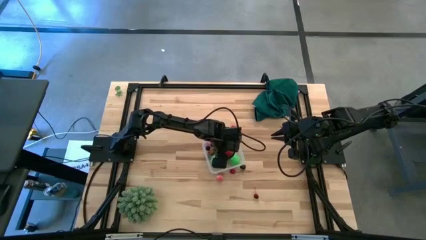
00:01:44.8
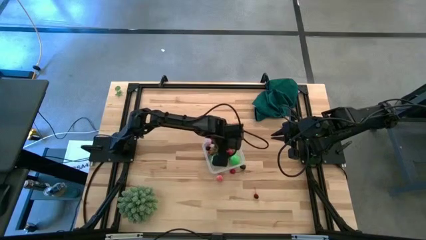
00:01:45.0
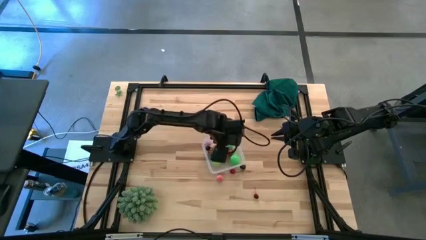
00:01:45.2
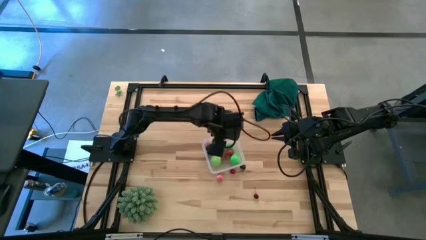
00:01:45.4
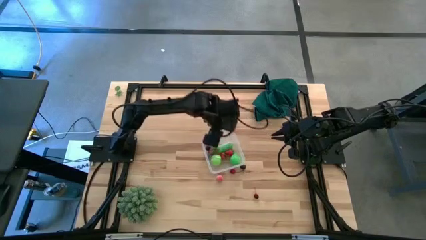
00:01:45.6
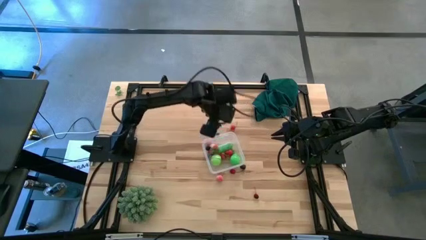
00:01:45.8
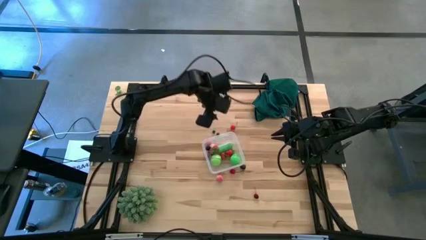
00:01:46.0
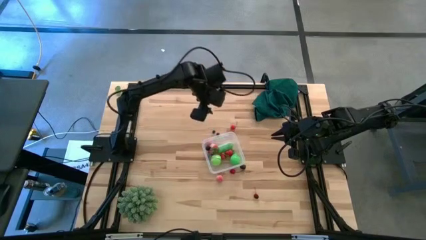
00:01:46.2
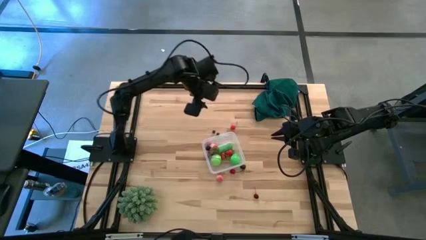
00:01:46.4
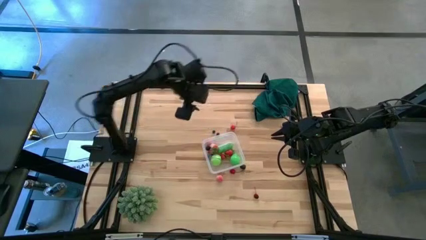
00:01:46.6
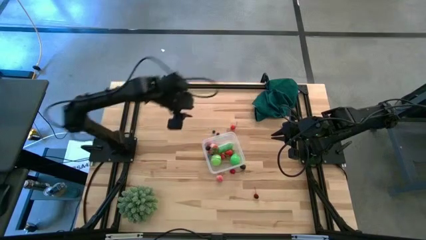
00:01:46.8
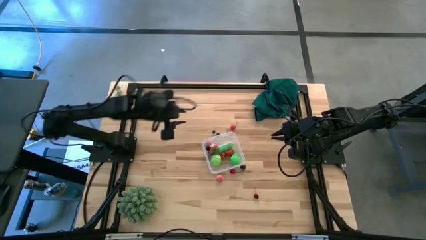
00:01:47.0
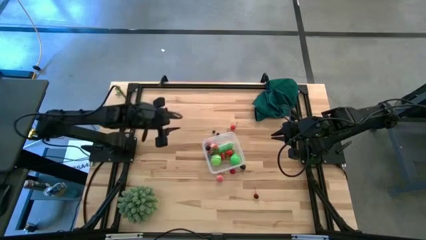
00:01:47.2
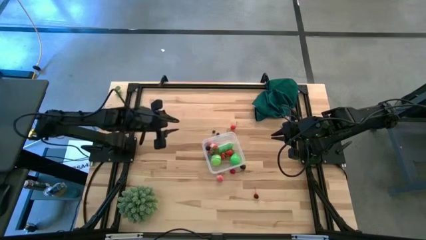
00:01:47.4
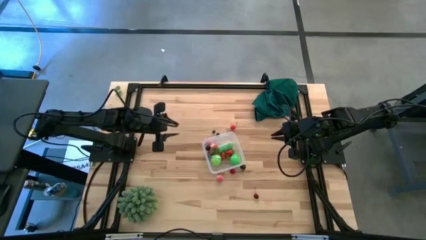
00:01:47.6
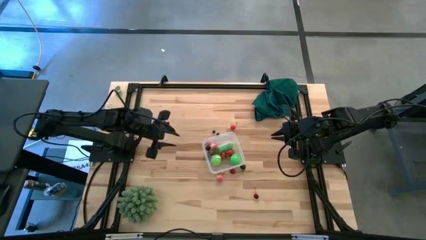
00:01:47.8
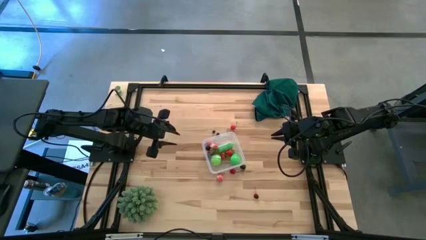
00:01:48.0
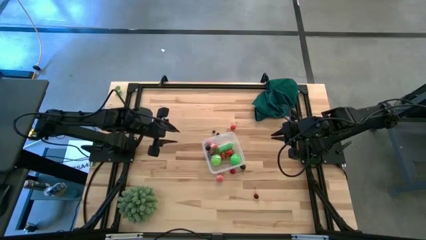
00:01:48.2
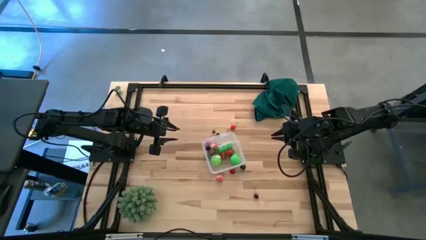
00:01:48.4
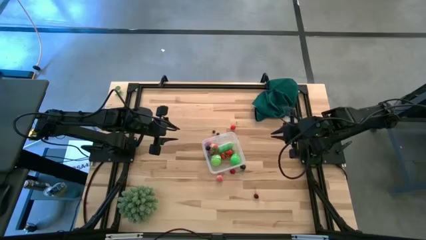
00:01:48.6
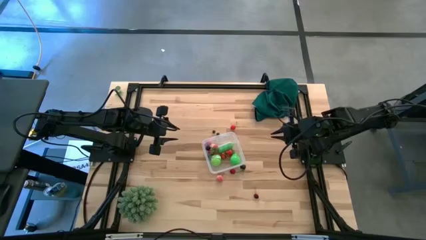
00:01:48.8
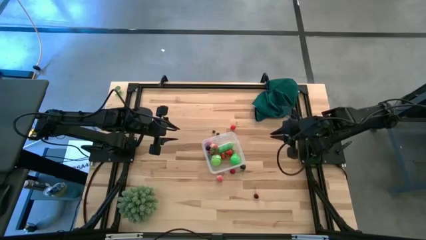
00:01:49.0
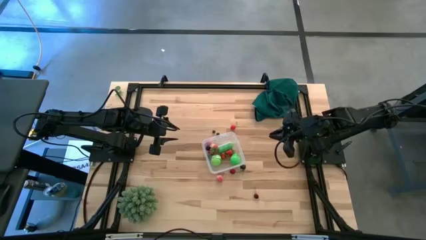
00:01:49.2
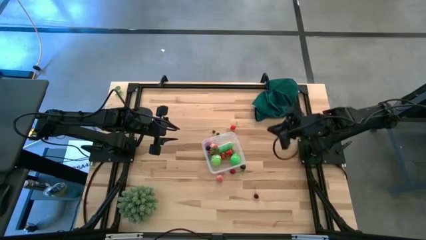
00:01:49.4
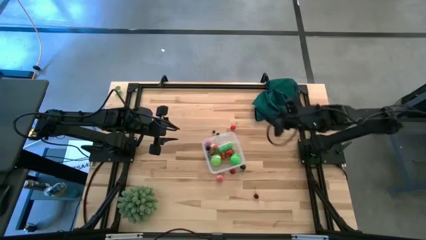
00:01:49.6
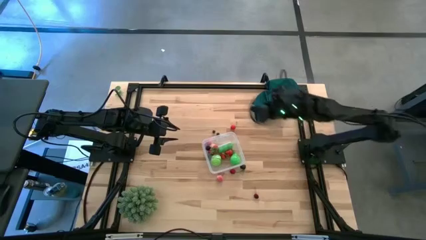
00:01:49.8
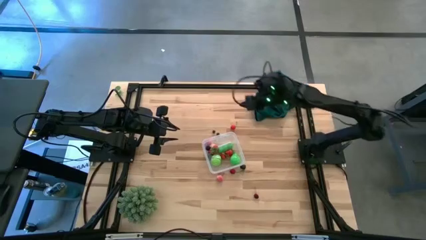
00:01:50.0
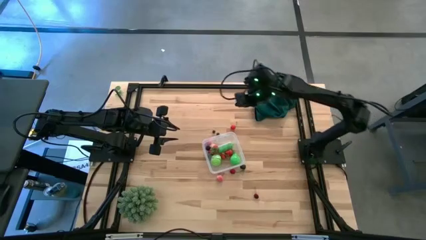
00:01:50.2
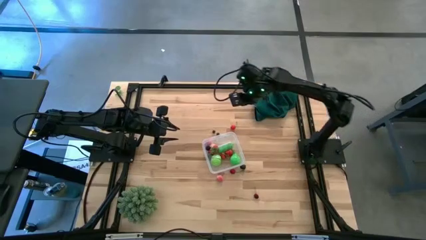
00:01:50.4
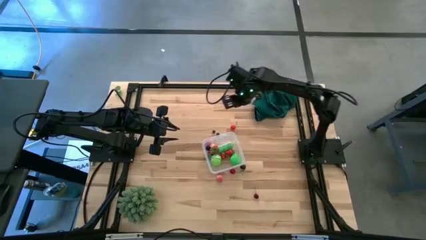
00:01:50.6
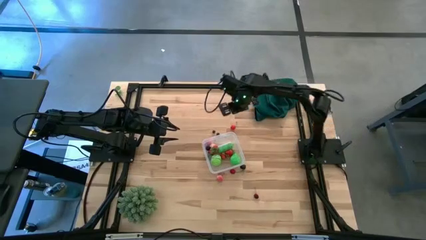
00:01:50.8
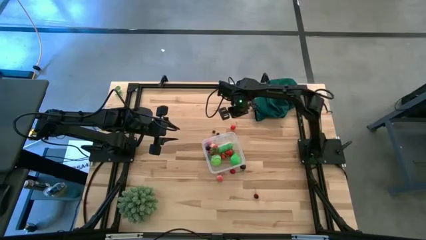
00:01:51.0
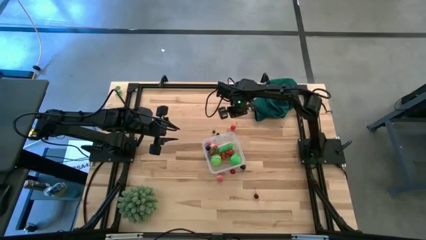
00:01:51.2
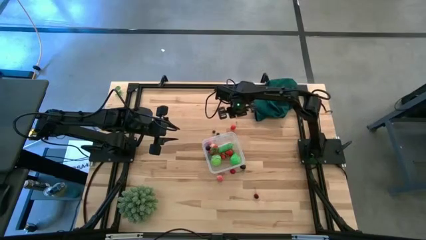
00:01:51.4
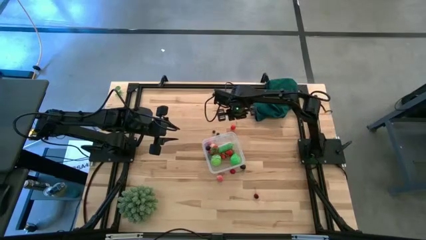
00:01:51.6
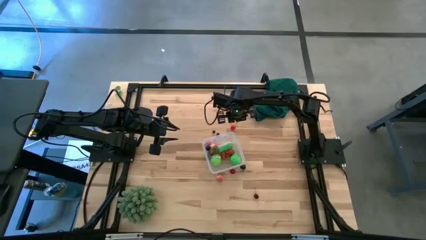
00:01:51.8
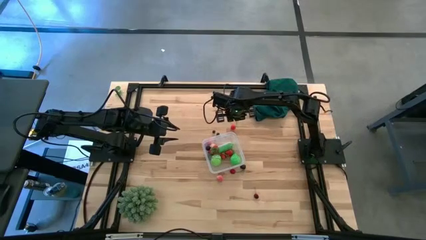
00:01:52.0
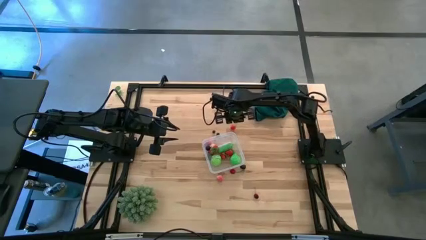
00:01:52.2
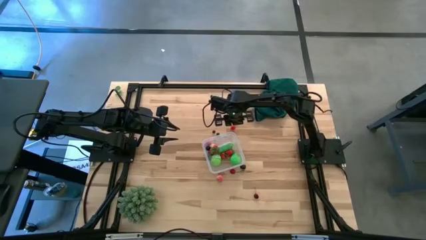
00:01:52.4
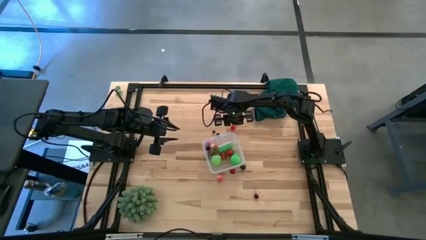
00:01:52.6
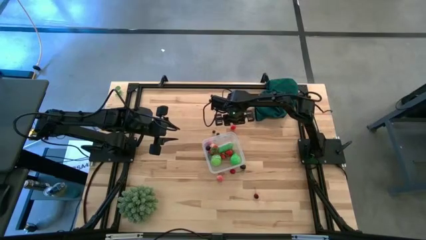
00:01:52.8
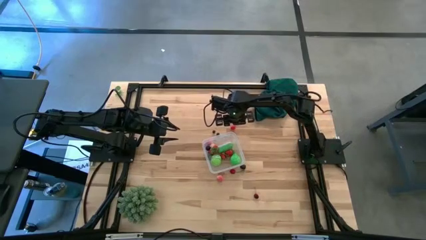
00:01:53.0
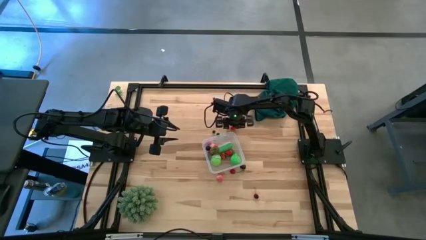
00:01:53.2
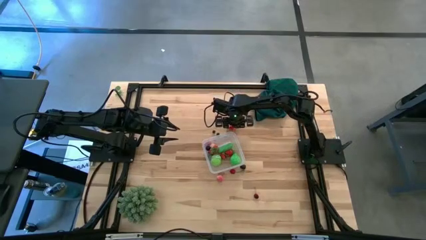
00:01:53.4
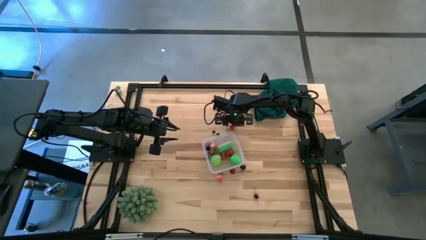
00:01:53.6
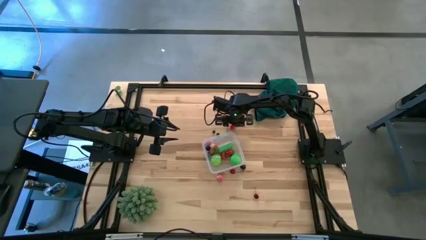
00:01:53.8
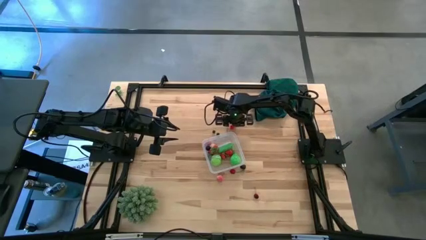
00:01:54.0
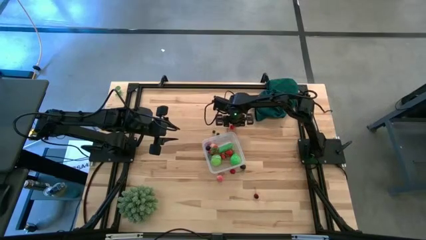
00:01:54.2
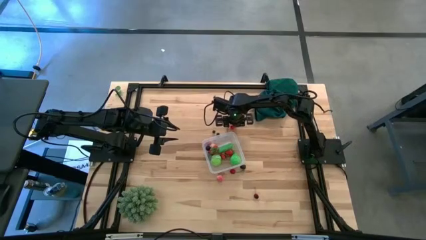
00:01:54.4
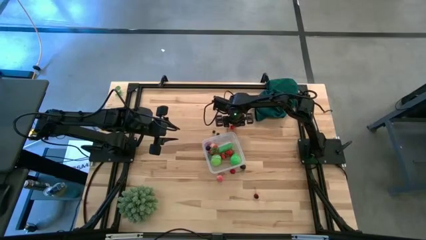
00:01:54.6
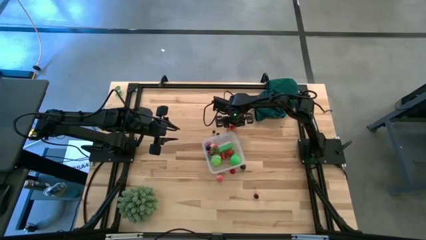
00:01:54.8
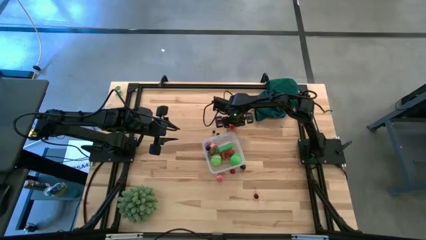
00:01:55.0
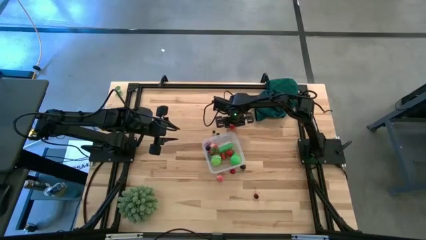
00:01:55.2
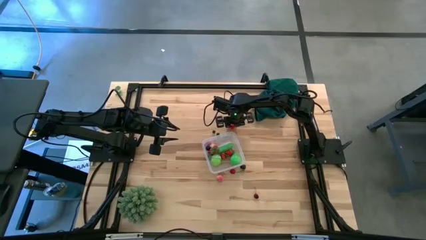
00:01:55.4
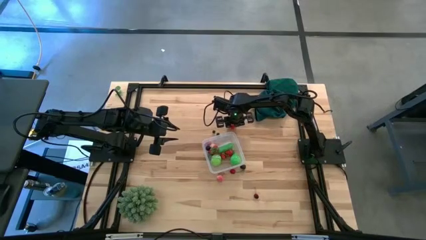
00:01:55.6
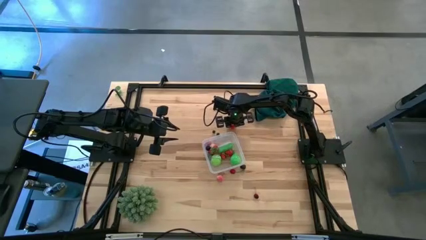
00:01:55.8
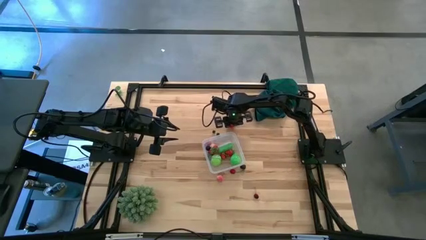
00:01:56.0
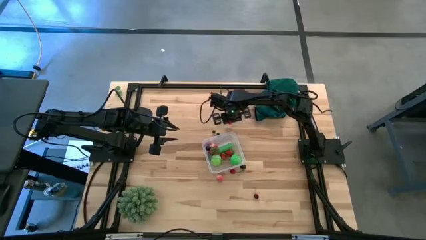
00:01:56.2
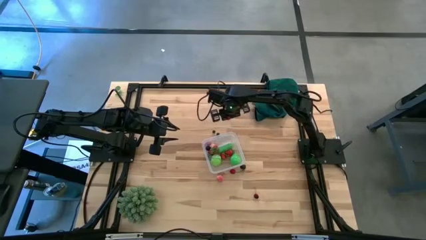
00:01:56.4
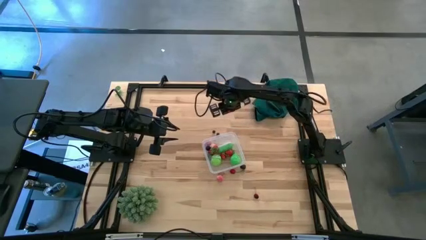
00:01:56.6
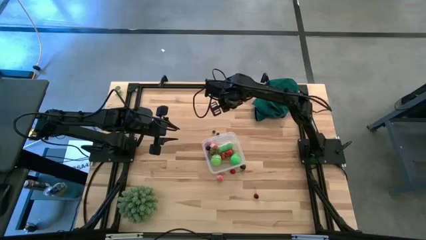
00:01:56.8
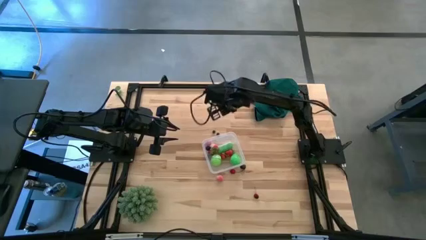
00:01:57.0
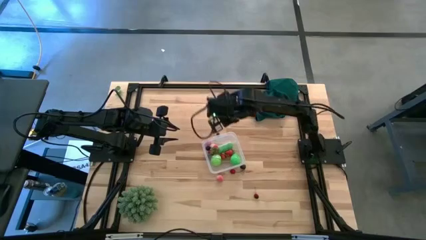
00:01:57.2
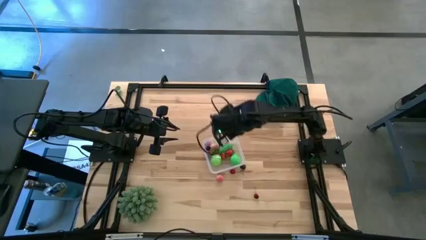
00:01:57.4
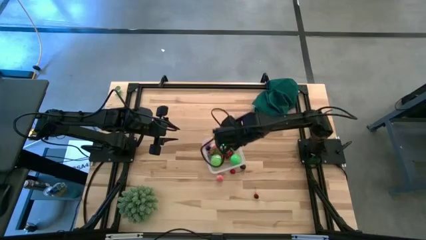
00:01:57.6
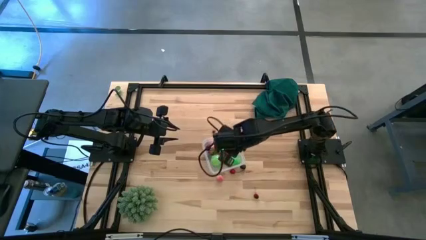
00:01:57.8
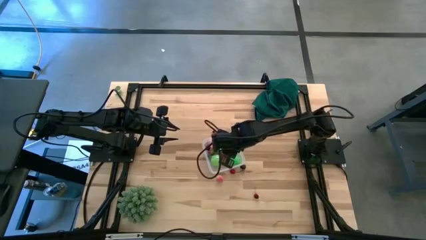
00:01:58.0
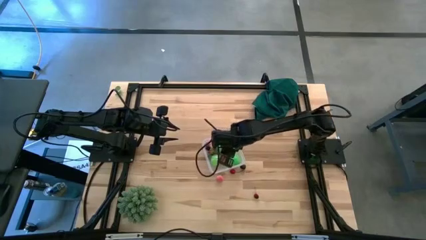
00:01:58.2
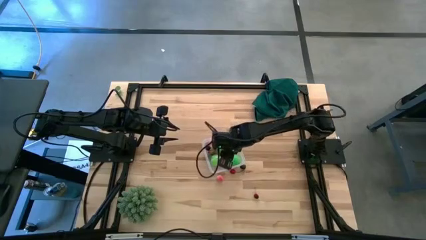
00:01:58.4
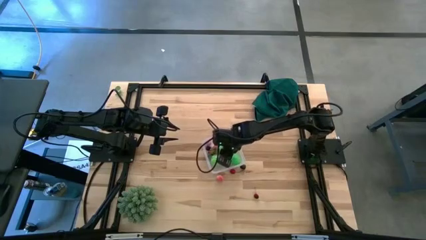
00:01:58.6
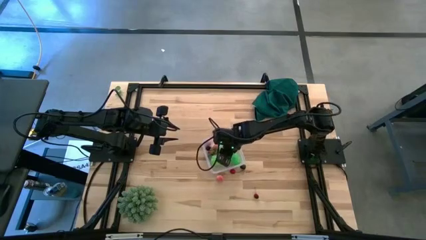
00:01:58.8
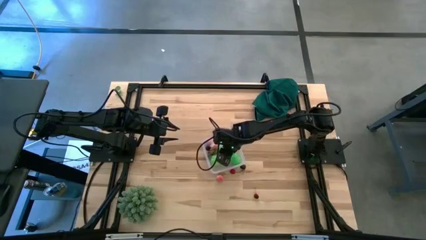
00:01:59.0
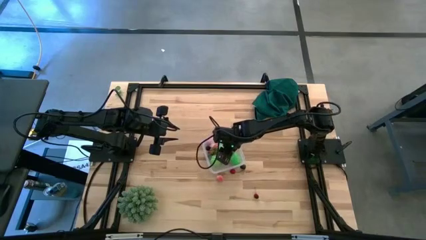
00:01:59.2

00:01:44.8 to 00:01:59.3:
Task: Pick and placing Produce into tupperware
Put the red cherry into the transparent container

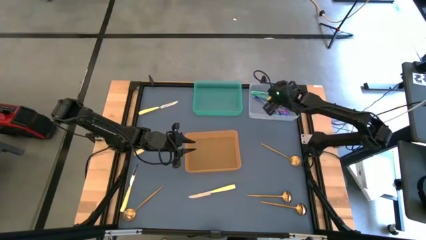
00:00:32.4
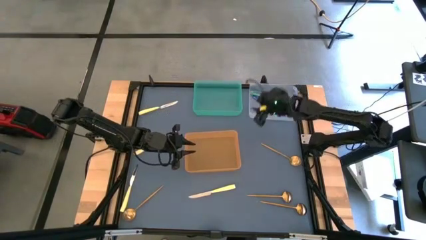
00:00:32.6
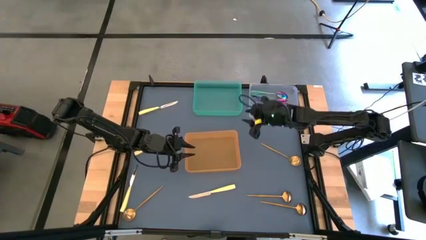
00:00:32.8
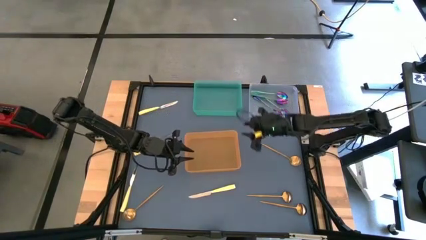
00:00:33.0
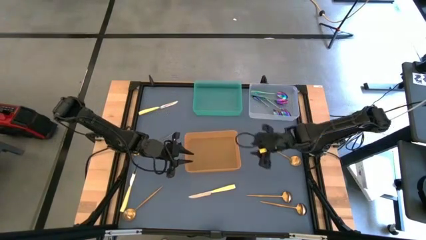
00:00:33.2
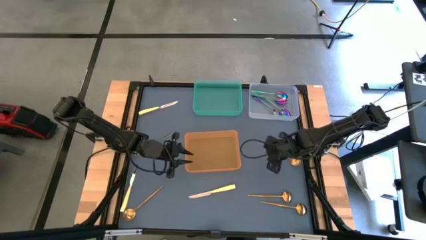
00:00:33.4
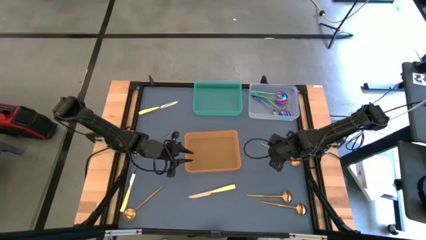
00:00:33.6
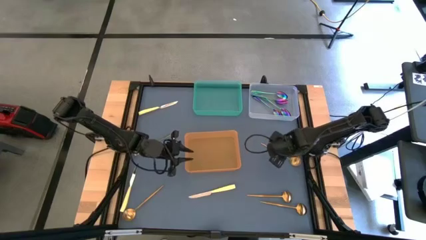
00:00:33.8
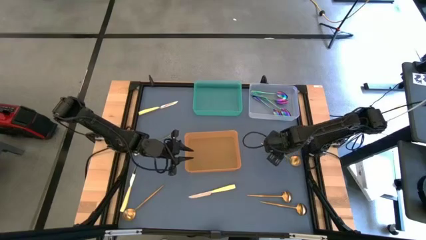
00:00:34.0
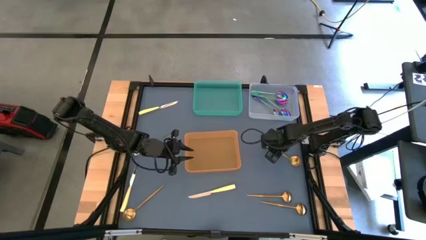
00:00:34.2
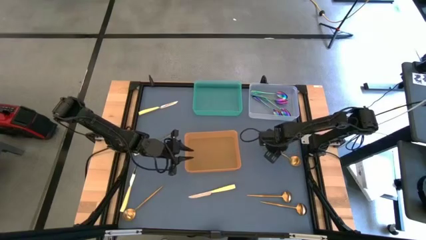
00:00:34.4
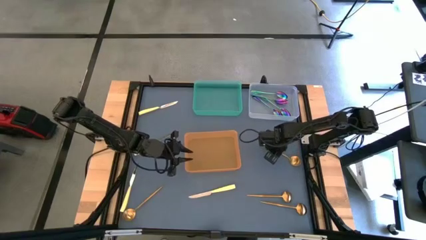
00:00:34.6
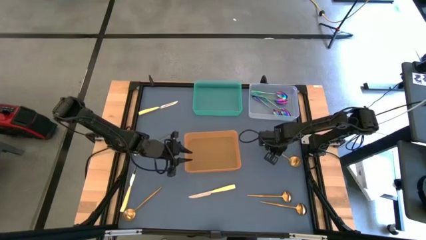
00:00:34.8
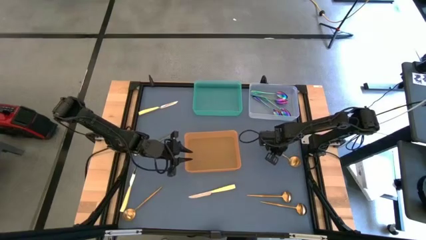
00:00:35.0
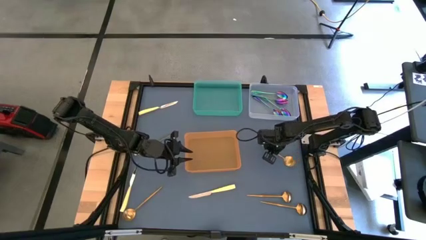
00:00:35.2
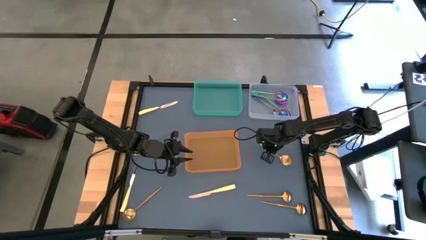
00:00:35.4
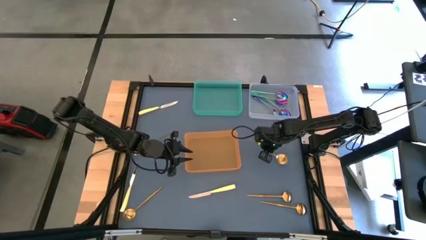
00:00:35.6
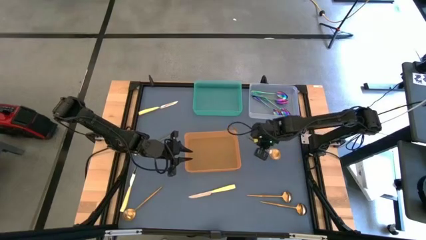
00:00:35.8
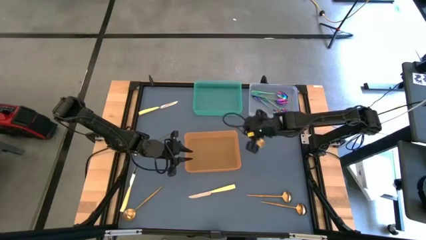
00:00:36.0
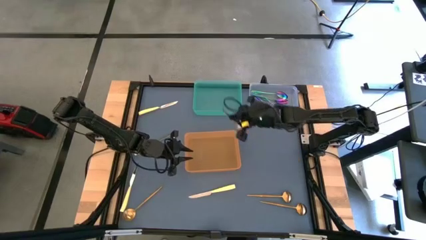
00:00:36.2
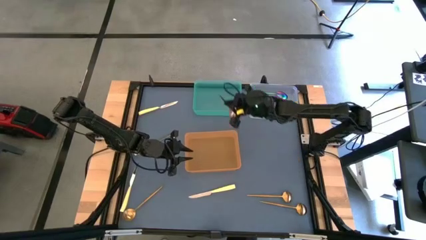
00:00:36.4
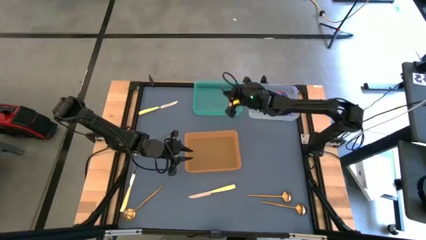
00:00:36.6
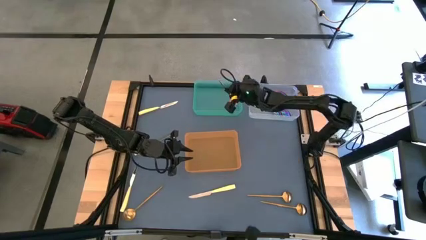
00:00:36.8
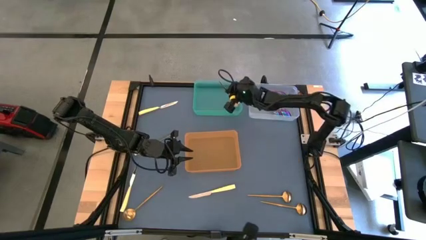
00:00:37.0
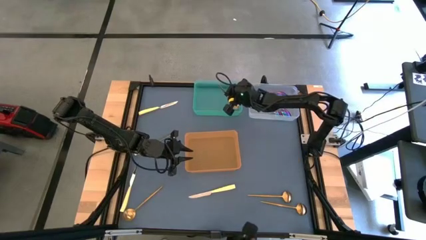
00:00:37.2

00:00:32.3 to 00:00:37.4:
Task: Sort silverware by color (type)
Put the gold spoon into the green bin
